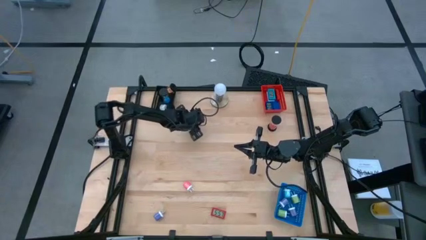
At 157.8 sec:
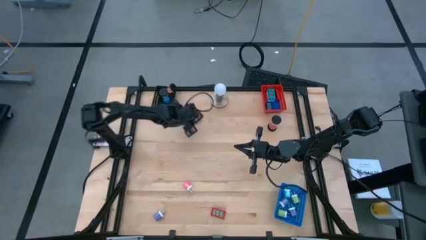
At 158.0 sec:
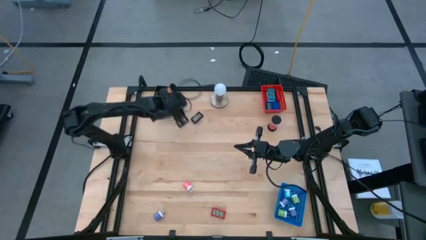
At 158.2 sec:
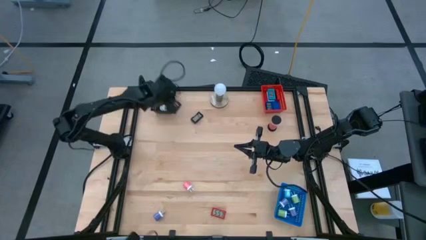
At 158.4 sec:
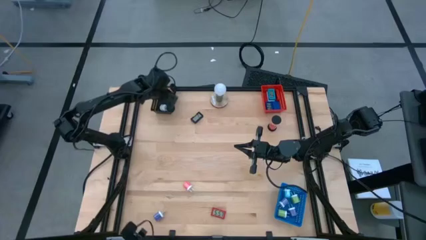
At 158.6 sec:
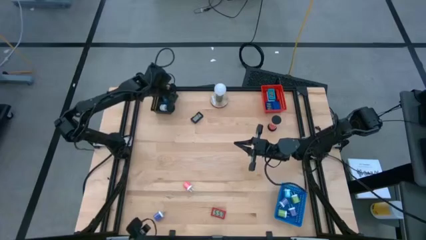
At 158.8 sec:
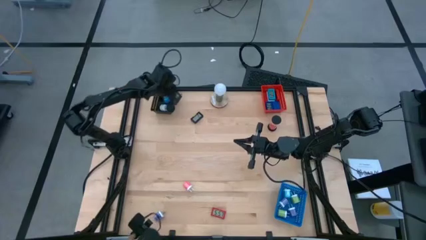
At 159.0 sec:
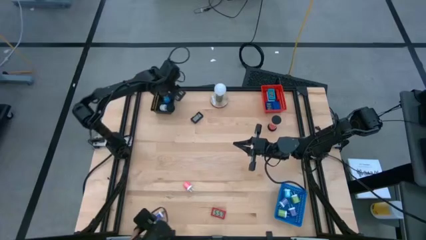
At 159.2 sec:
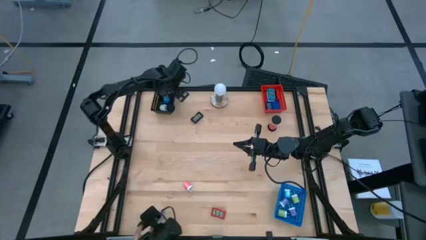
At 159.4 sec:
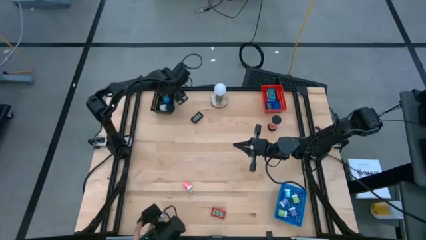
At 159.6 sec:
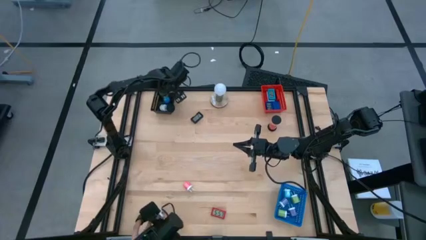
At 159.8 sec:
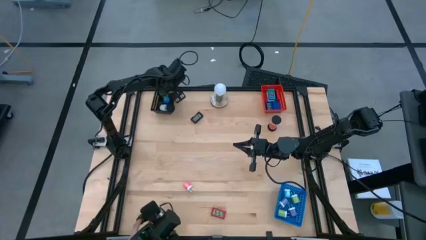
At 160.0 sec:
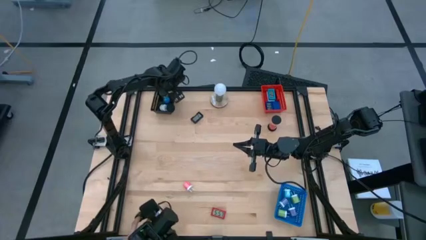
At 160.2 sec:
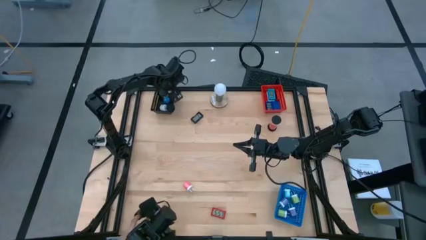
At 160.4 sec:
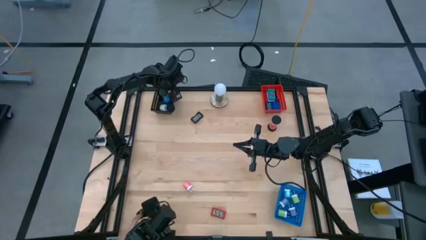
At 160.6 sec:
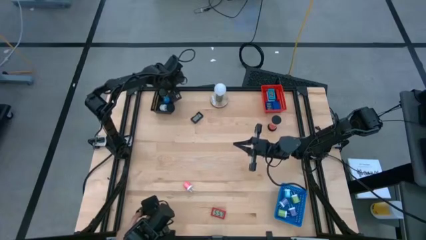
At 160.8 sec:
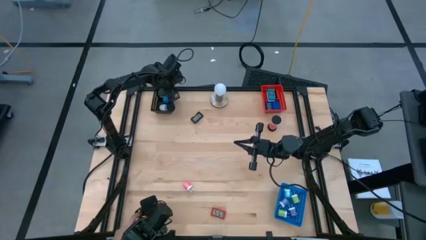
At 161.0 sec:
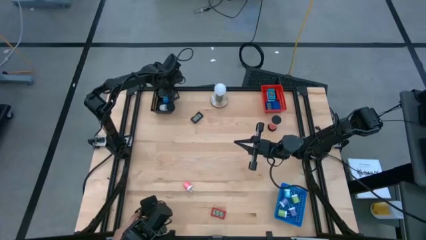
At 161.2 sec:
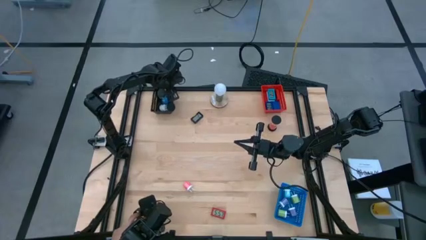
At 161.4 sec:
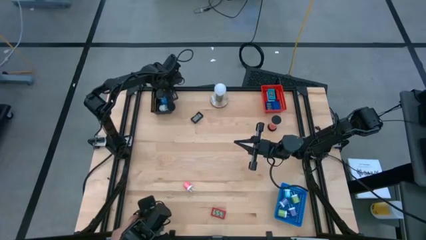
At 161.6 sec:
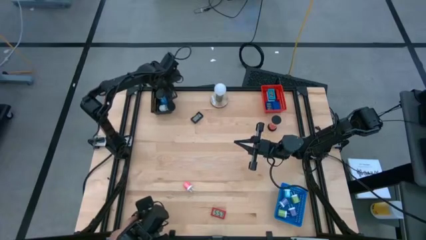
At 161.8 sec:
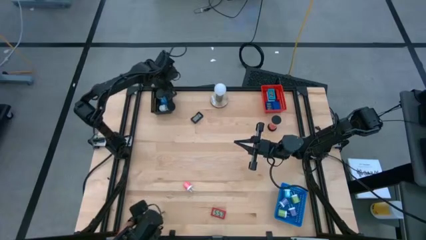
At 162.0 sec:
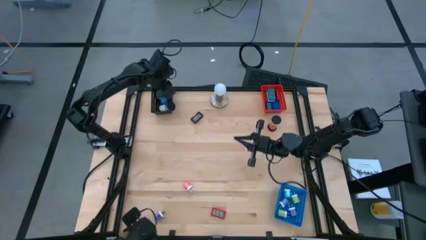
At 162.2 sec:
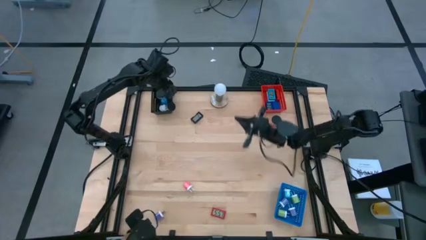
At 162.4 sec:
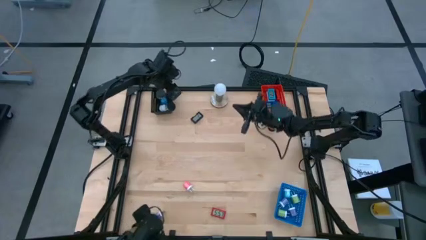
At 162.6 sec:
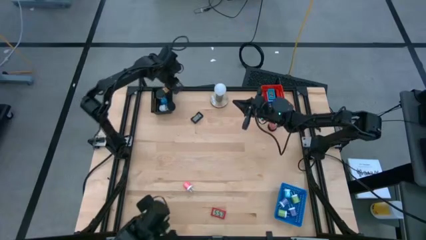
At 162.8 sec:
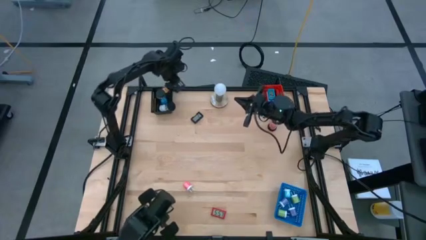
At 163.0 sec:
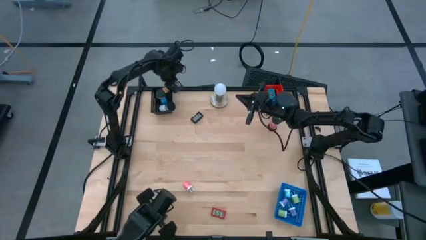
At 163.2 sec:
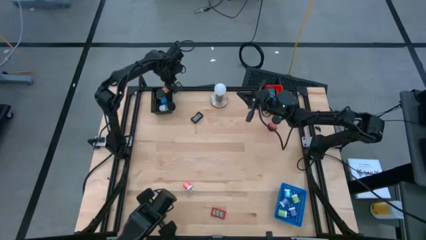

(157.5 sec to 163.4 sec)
Task: Pick & Place Office items
Adjust the yellow hourglass

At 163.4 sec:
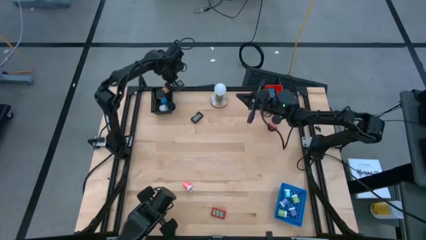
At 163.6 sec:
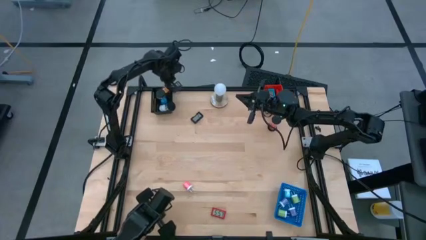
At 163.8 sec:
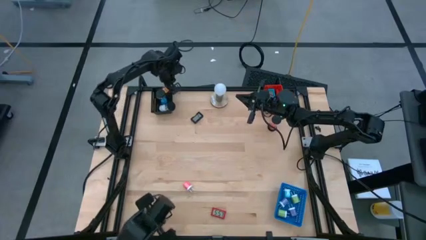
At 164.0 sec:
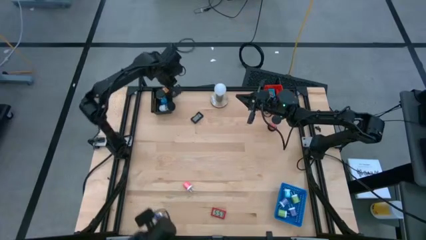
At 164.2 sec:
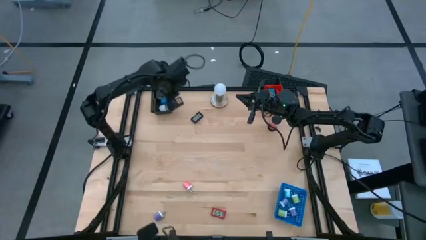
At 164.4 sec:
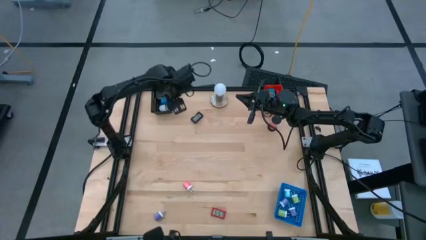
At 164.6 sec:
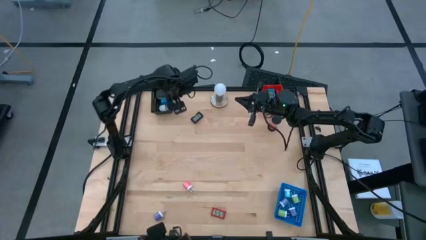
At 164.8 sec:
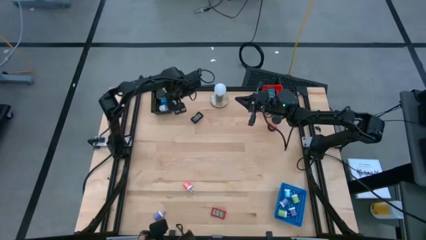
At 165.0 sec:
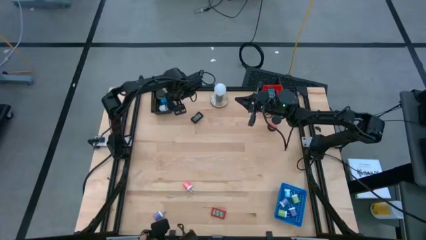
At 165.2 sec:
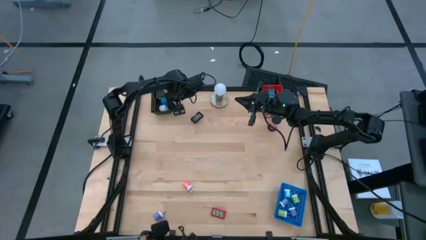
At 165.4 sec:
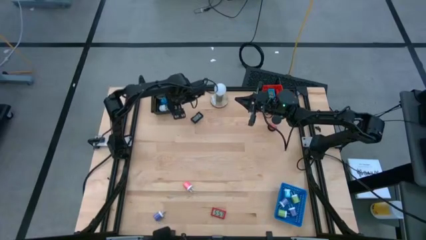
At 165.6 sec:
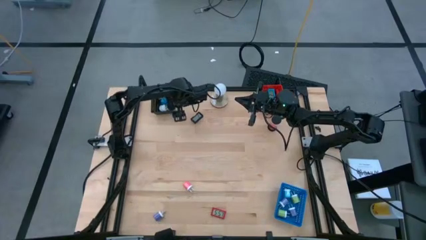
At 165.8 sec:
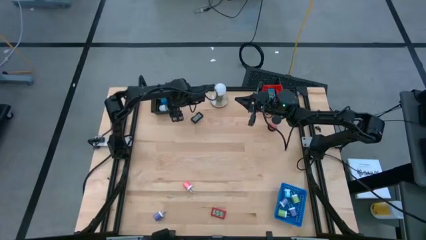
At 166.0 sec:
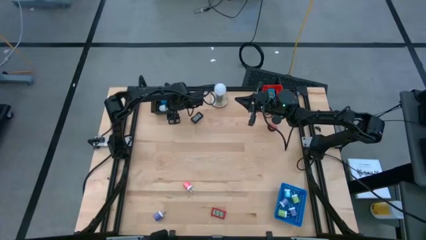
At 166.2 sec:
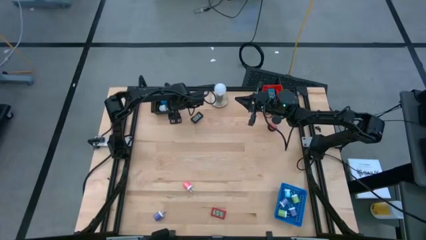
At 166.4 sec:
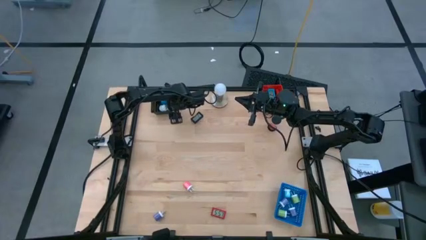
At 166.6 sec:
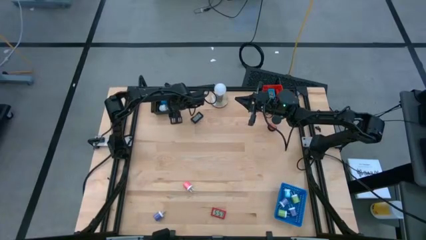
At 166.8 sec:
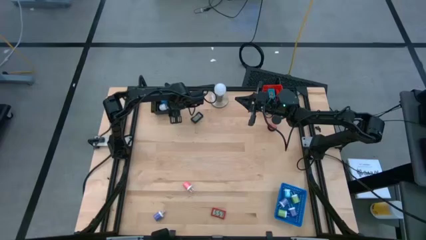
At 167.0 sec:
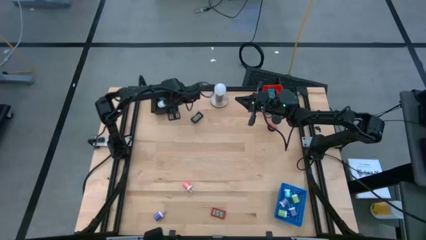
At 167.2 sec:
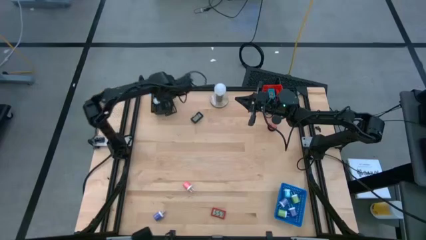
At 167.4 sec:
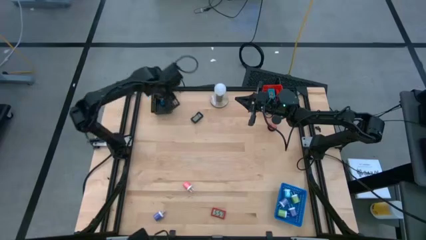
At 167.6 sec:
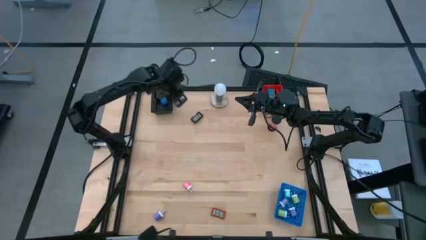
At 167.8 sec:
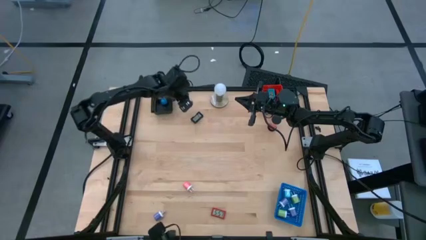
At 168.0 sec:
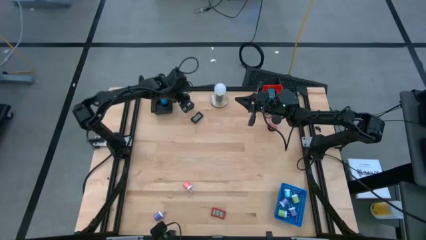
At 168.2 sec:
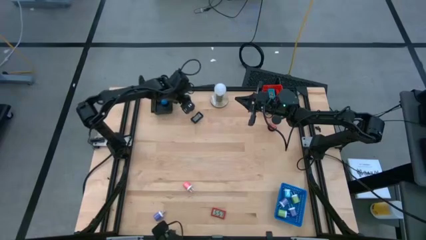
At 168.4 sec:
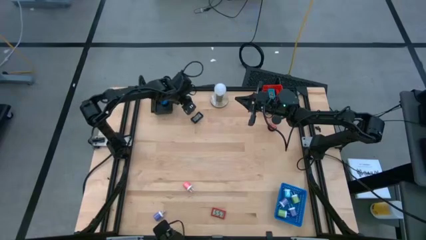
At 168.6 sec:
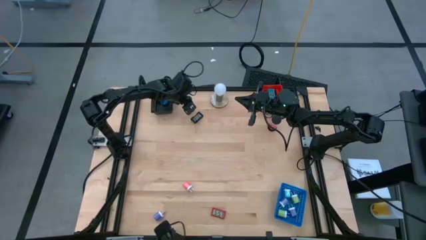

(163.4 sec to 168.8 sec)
Remove the white hourglass from the black bin

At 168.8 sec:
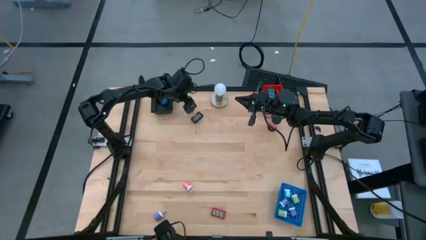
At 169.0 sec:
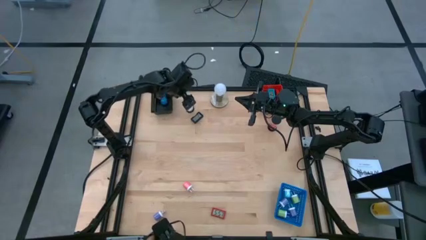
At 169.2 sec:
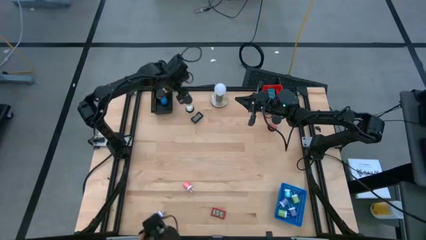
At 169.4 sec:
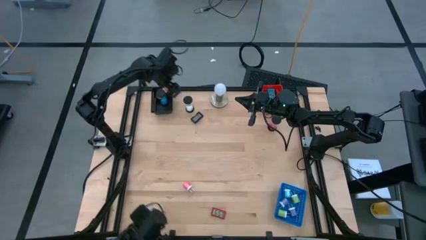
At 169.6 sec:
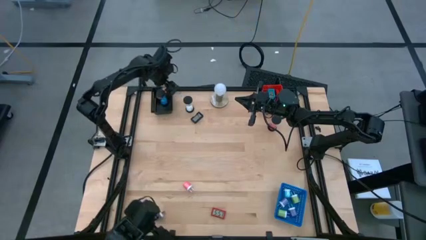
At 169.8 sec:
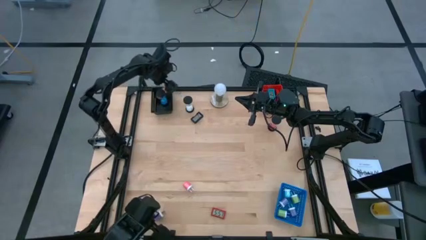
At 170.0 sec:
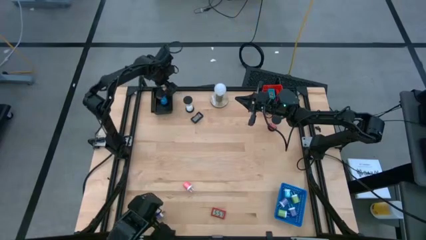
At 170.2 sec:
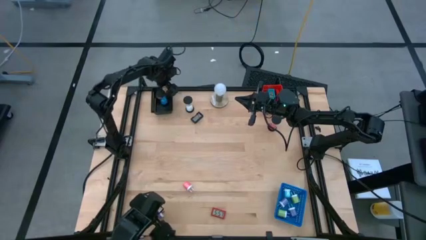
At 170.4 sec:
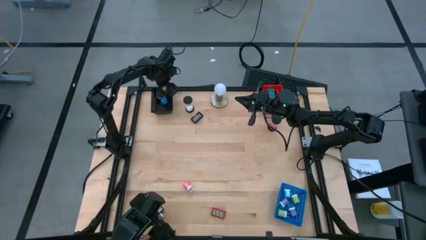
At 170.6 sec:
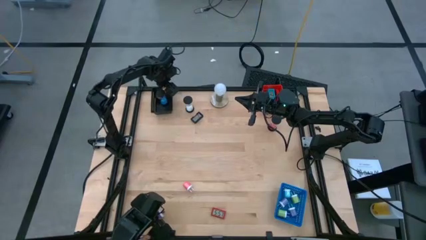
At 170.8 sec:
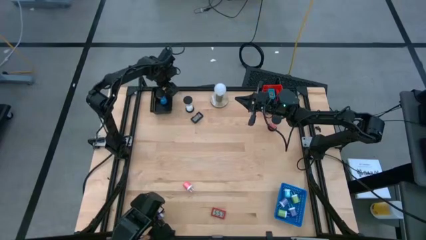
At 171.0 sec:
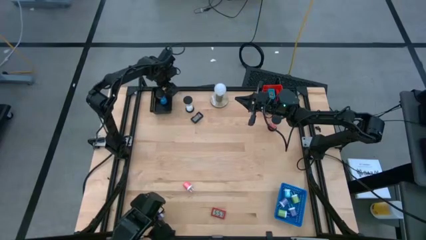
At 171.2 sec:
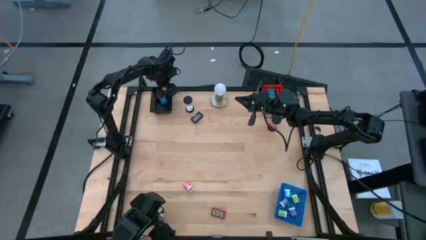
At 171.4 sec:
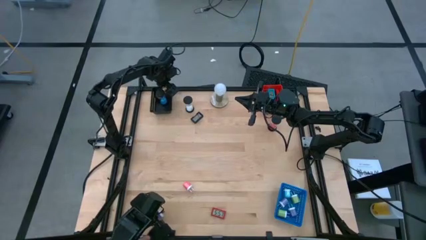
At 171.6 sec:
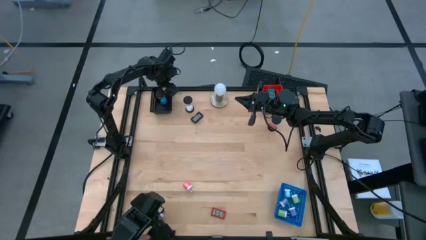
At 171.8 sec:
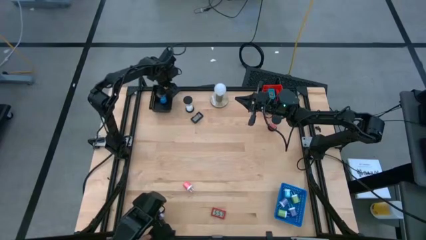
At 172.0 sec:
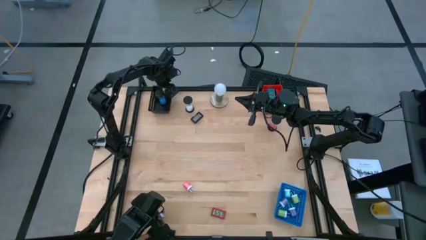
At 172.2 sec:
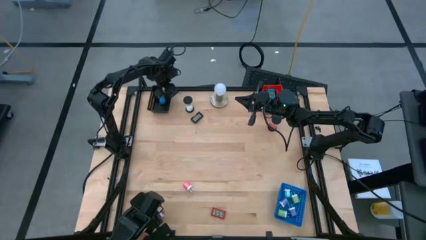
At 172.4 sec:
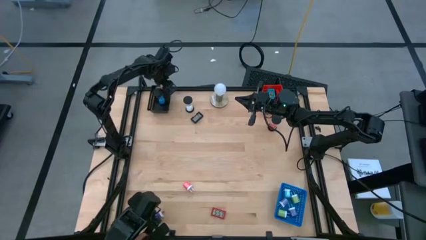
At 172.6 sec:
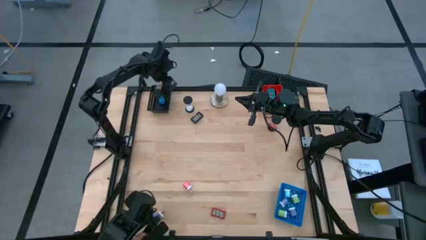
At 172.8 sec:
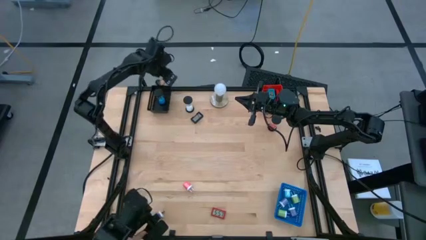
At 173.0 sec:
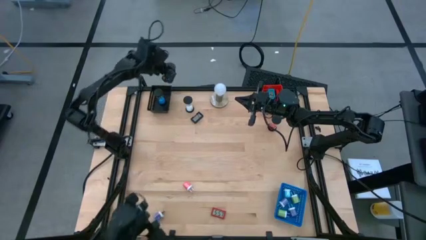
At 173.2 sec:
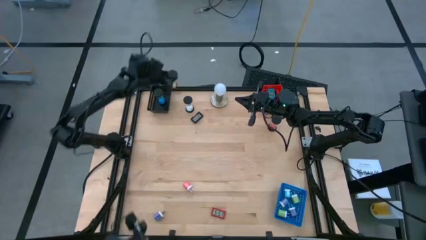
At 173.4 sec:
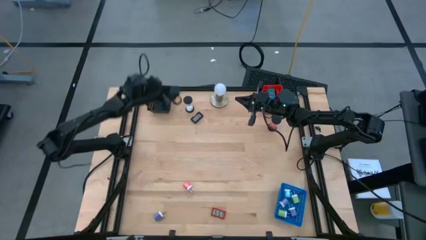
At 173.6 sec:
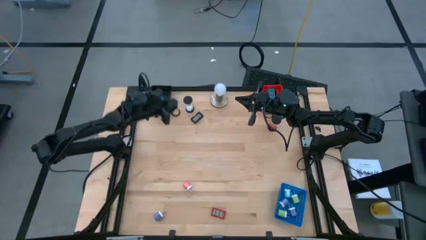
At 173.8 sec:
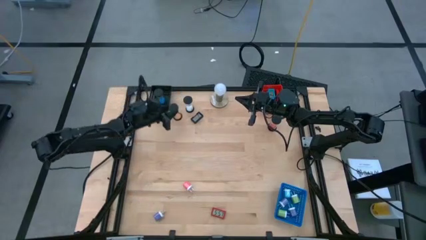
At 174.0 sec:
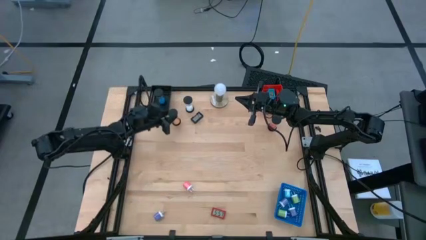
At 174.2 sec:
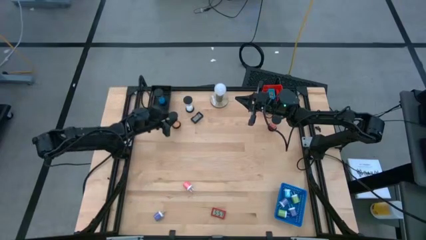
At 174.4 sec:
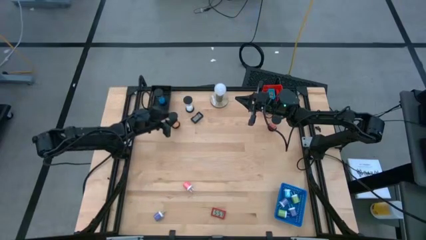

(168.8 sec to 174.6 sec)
Remove the yellow hourglass from the black bin
